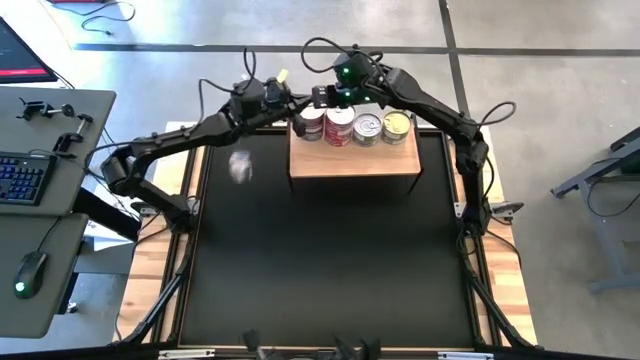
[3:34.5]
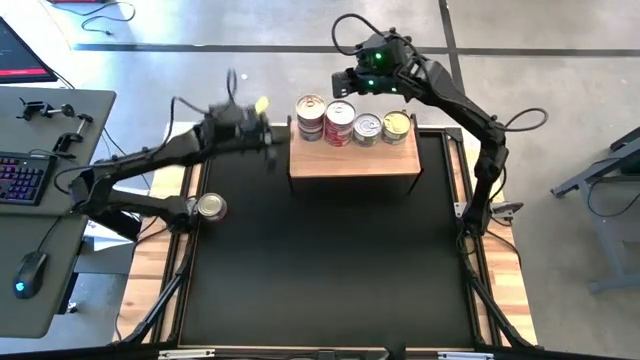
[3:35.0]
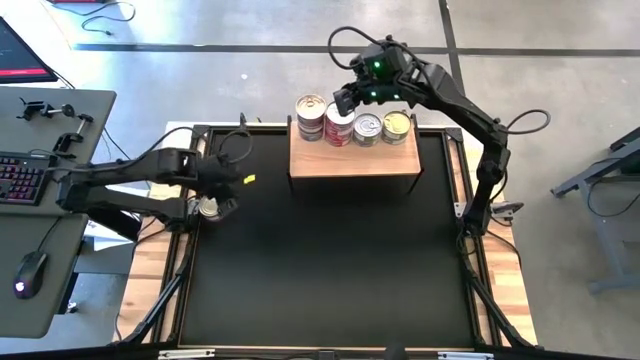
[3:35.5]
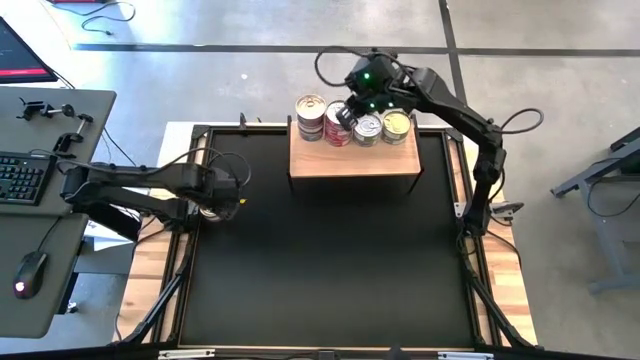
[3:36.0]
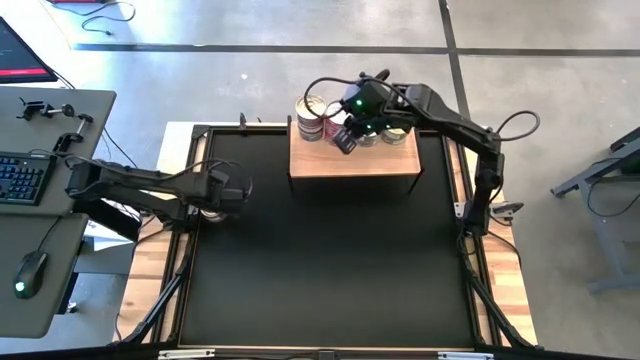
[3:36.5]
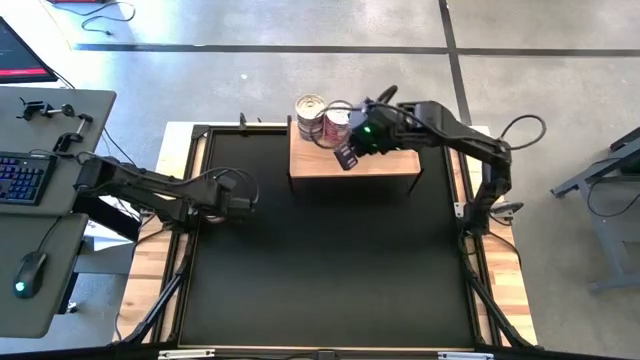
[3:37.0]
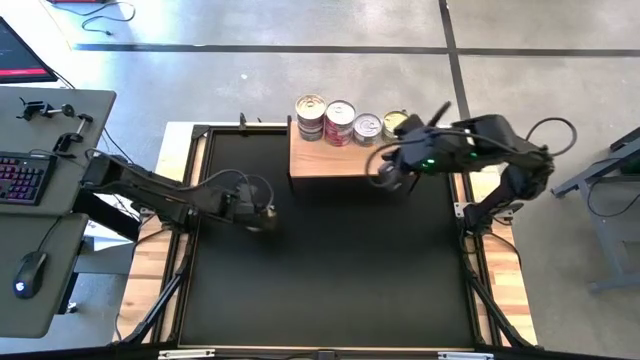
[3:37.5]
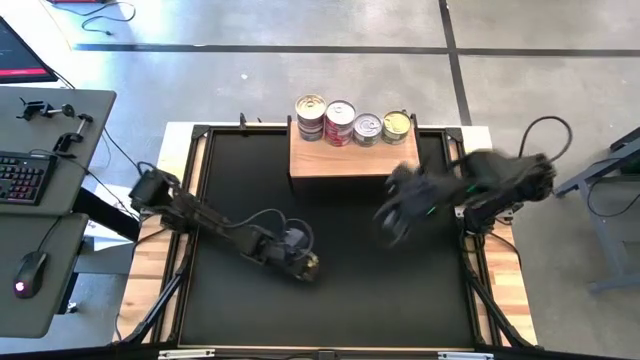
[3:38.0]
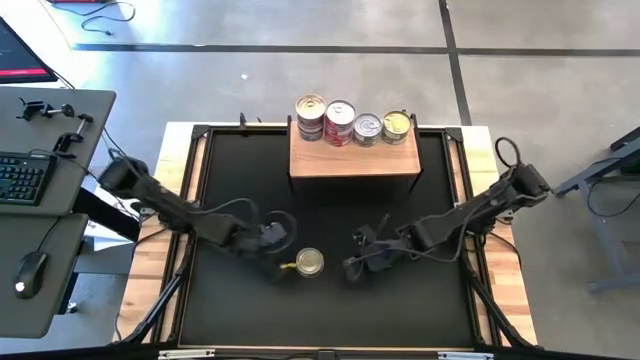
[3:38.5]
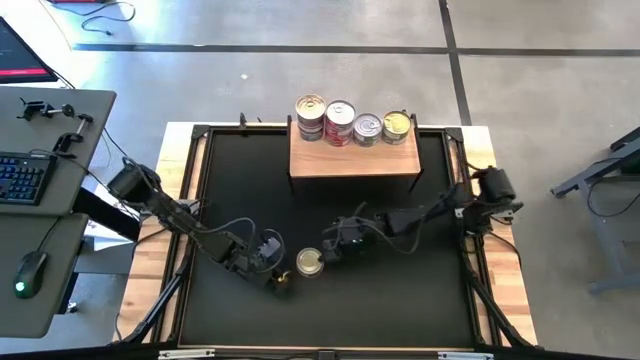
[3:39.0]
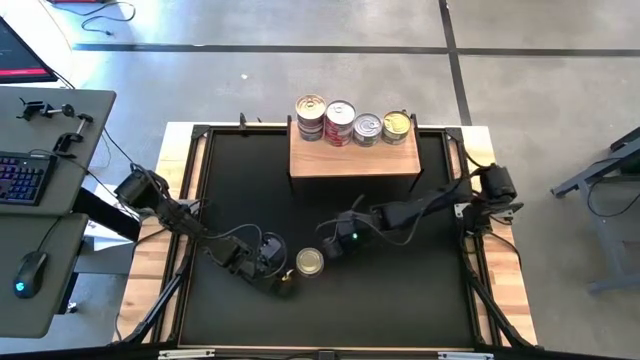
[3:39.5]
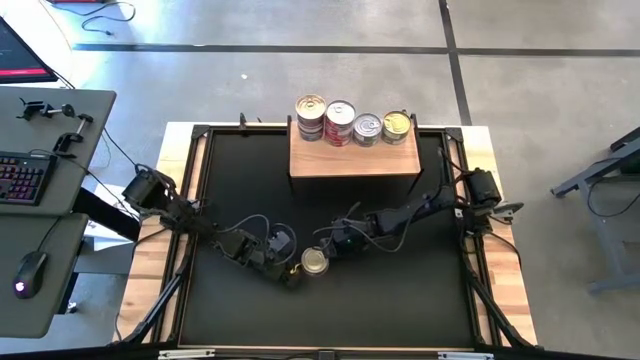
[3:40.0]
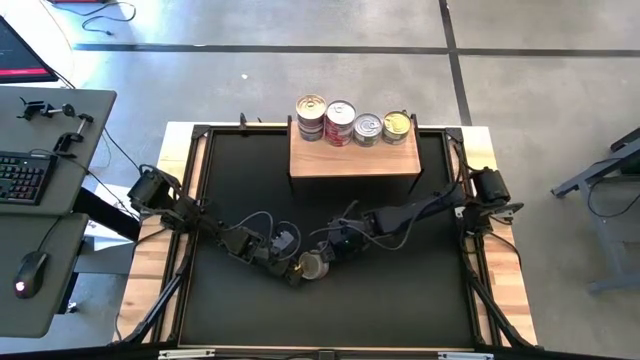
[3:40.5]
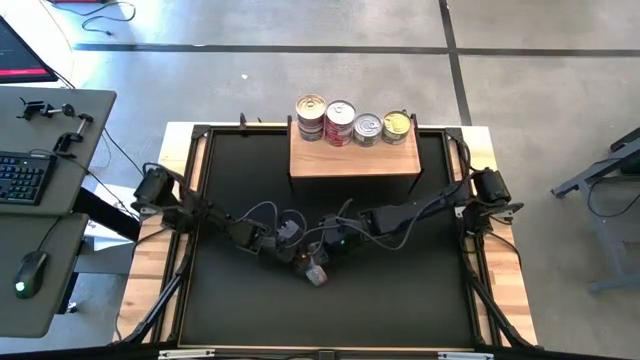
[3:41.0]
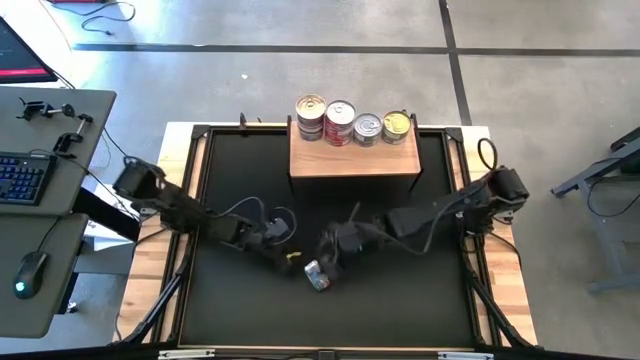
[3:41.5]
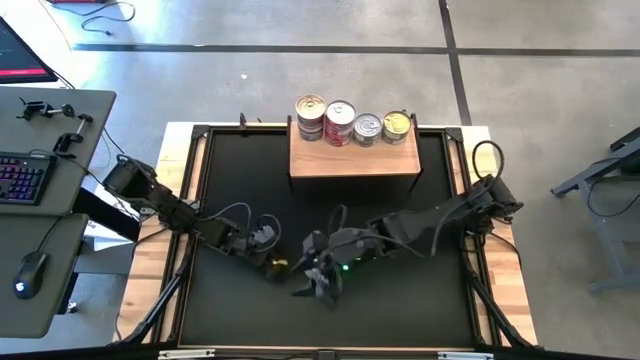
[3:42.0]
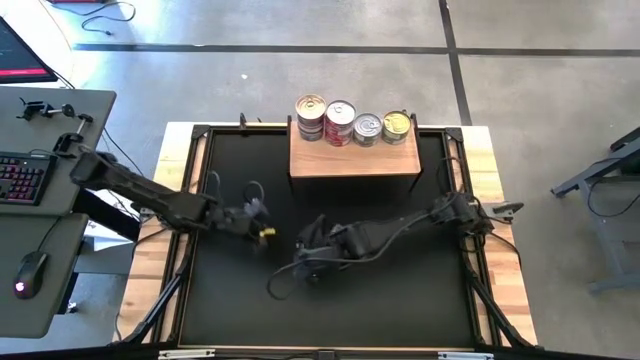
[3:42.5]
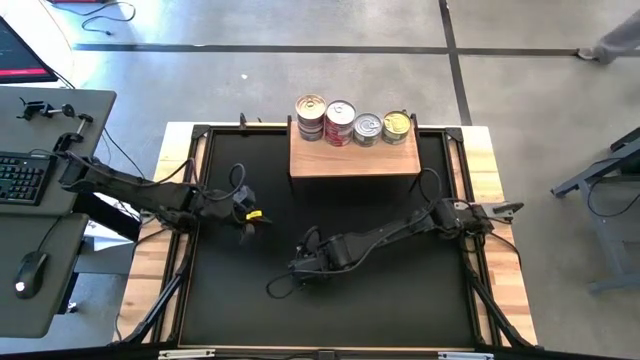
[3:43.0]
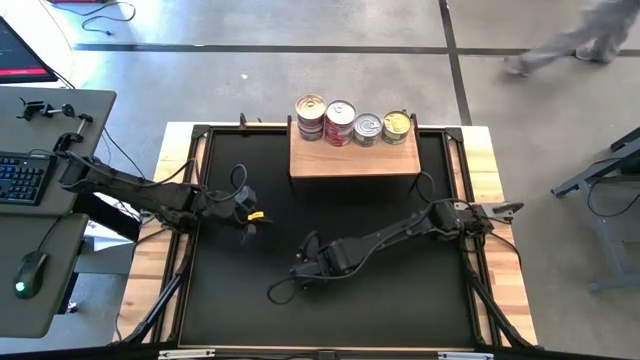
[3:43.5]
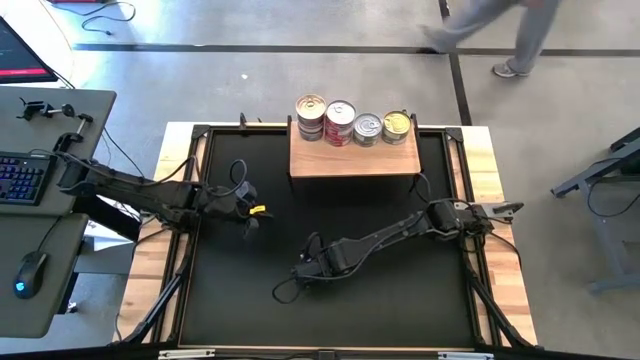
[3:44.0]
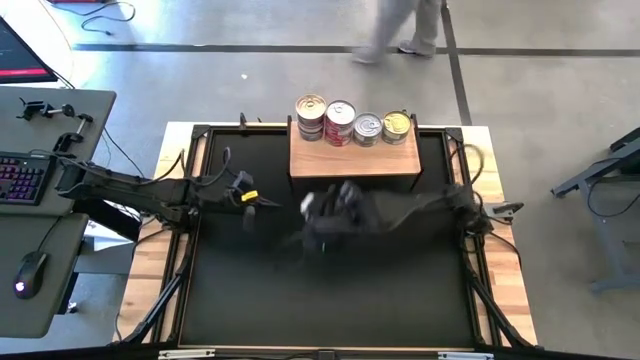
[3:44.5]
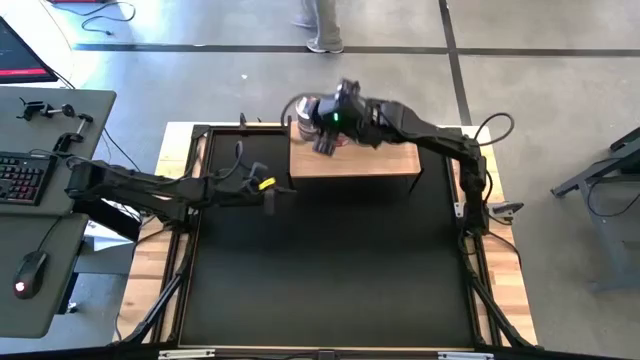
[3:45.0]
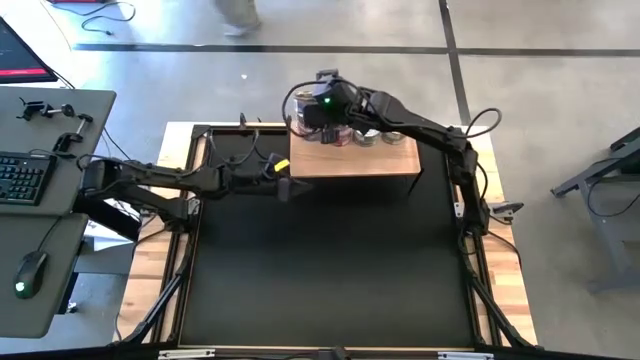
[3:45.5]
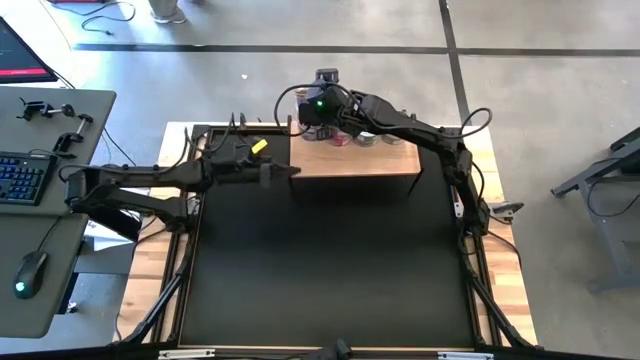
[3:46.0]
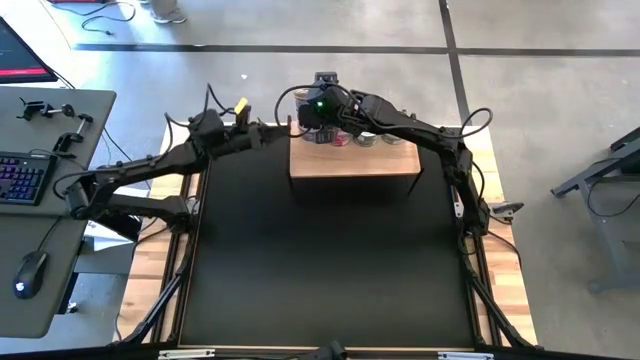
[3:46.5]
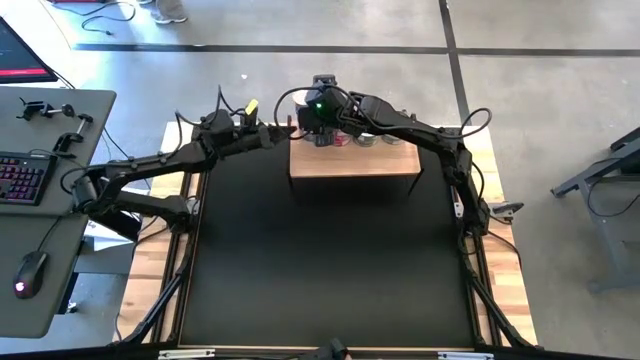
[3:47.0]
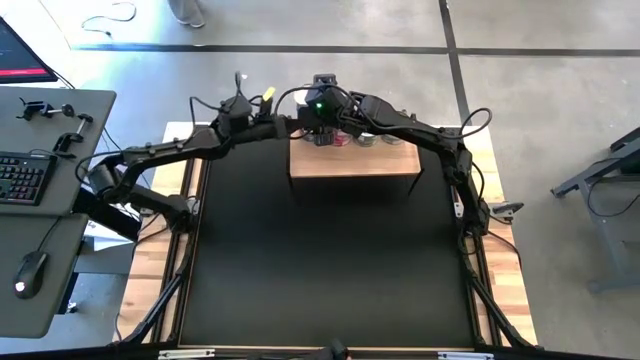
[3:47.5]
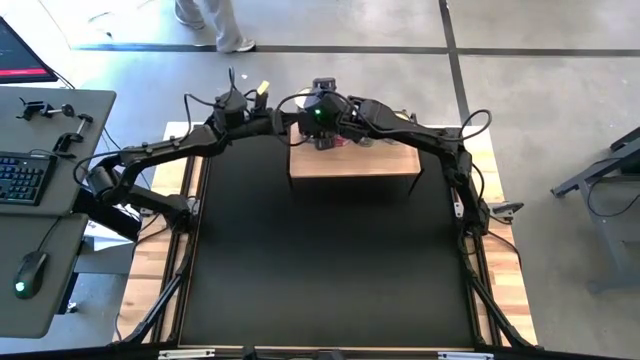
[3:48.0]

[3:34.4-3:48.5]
Task: Stack canned seafood by type on shelf
Stack the blue-pink can on top of the blue-pink tuna can on the shelf

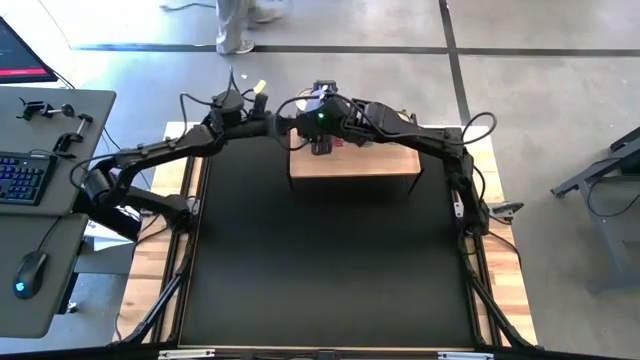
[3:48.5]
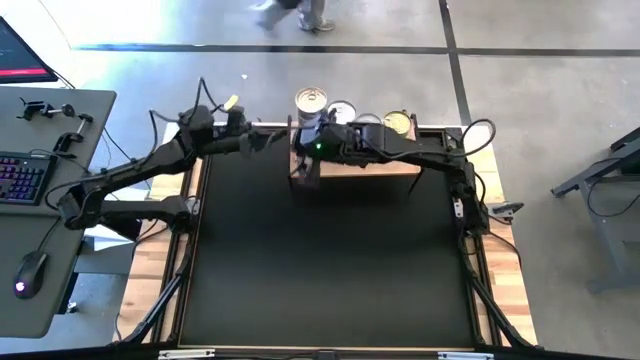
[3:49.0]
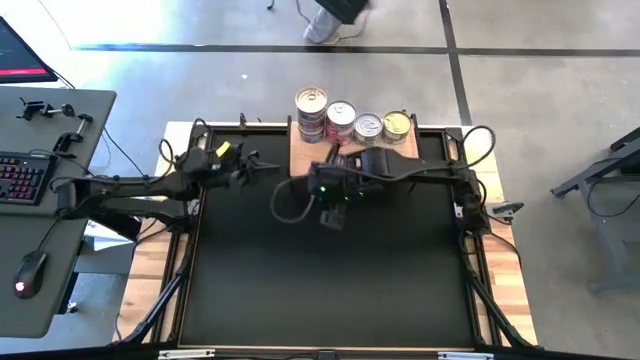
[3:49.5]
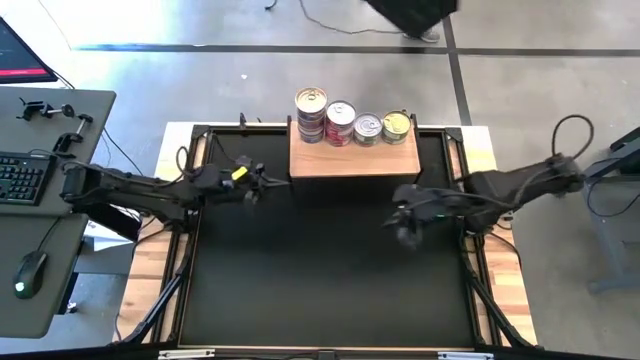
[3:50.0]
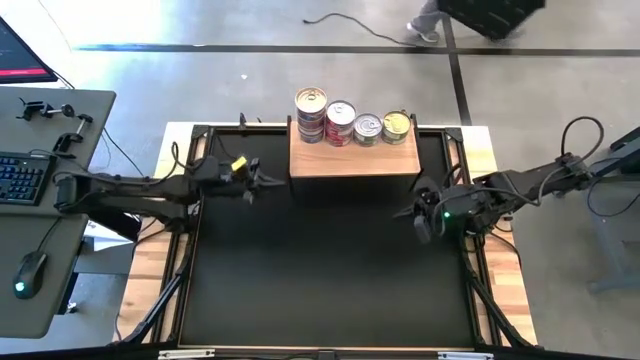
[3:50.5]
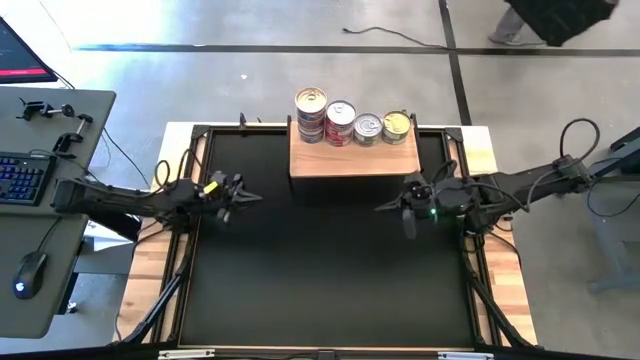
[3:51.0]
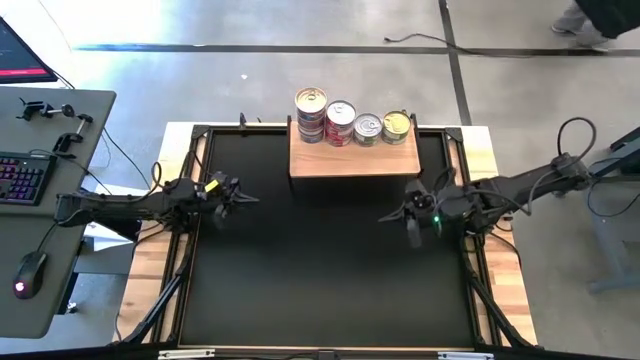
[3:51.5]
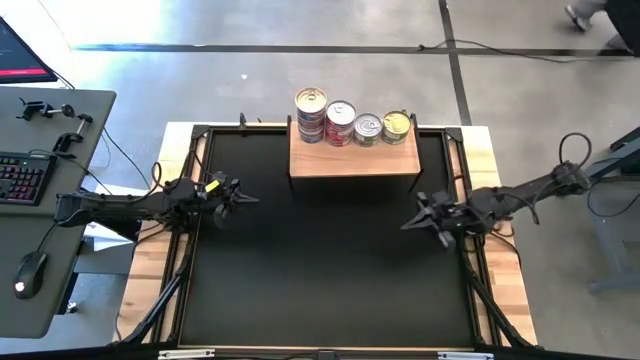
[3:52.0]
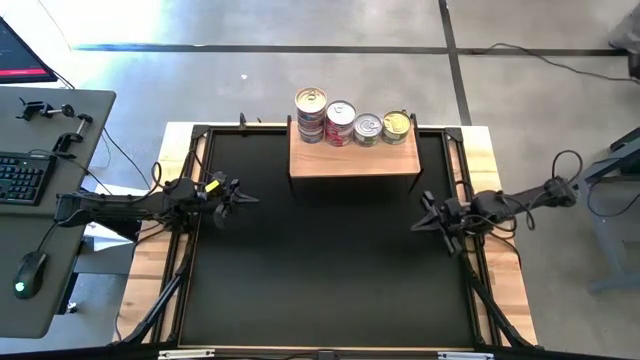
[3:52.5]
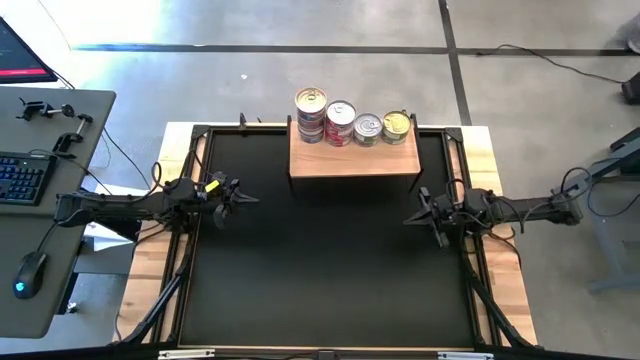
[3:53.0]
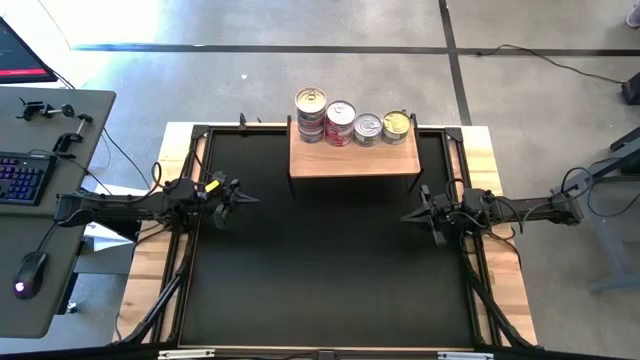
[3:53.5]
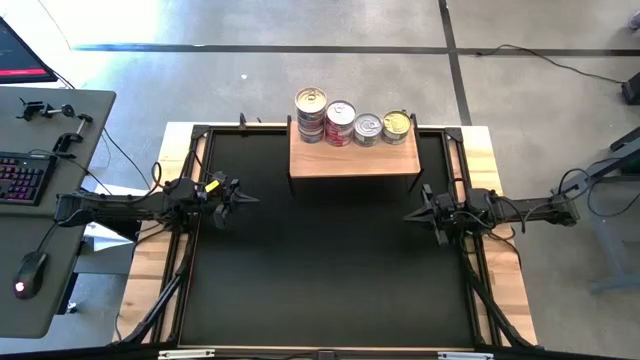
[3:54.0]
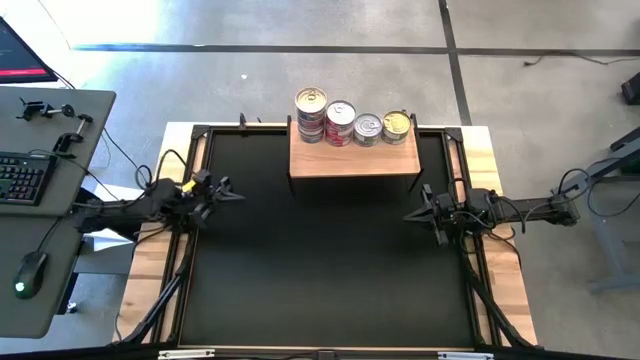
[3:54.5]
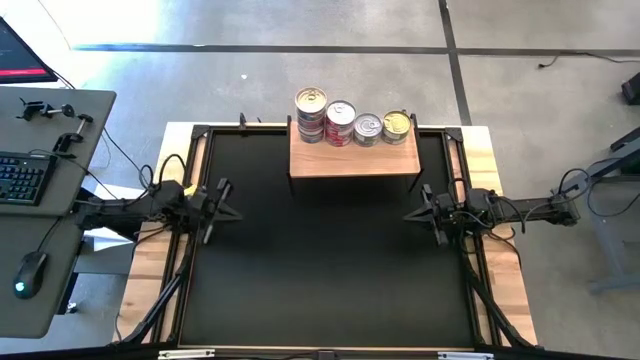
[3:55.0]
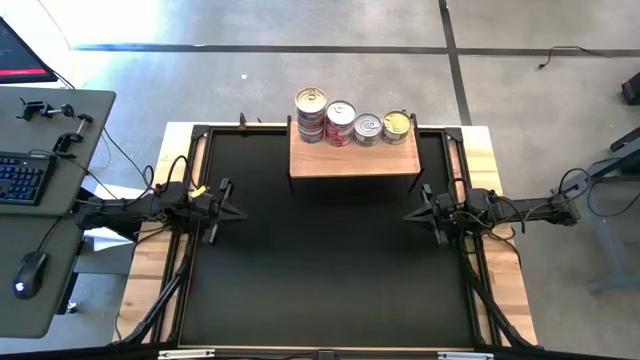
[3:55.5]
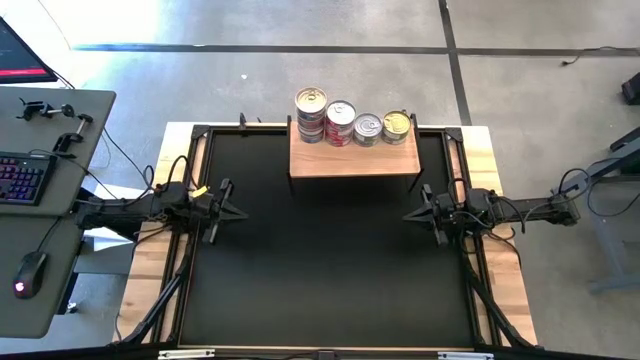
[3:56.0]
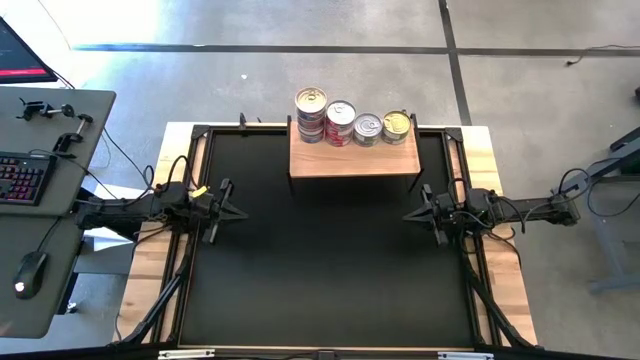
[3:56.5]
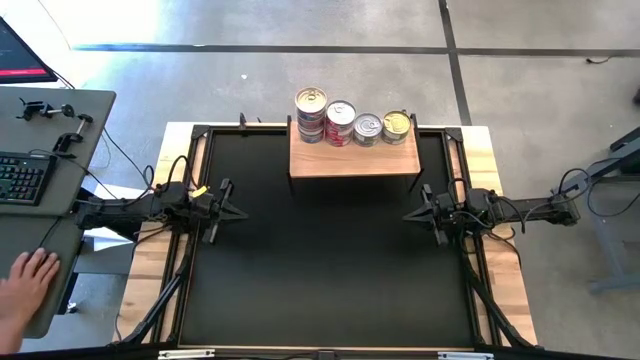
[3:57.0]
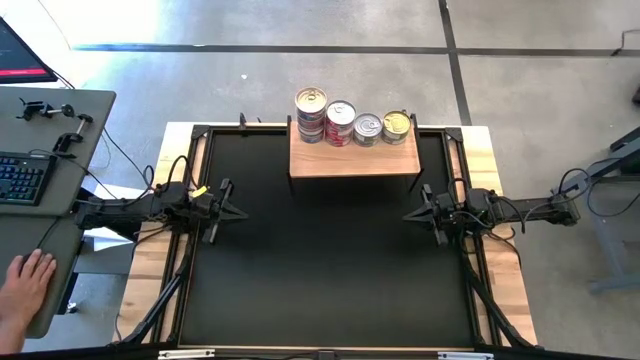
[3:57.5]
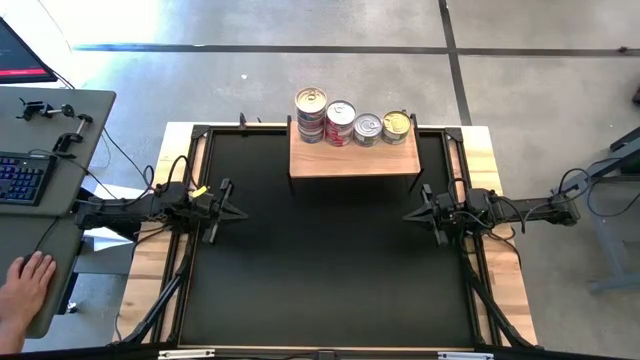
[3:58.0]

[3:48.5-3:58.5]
Return to Home Position
